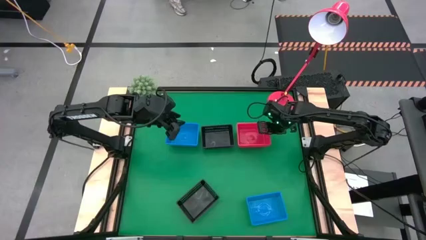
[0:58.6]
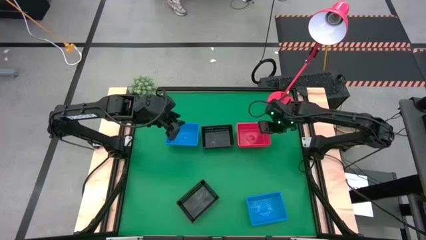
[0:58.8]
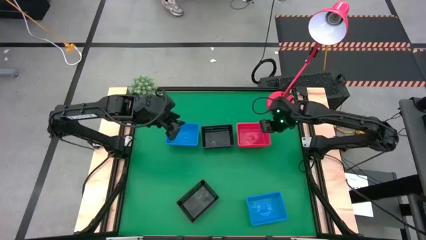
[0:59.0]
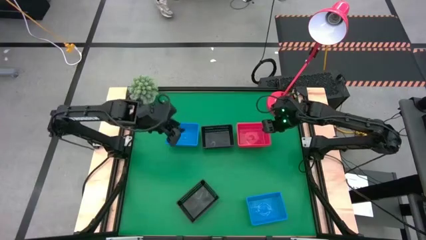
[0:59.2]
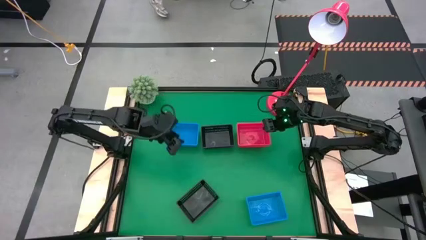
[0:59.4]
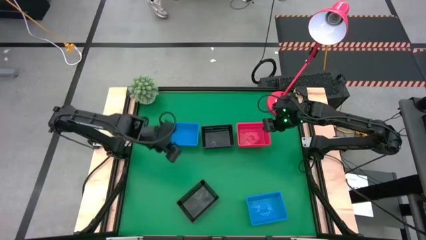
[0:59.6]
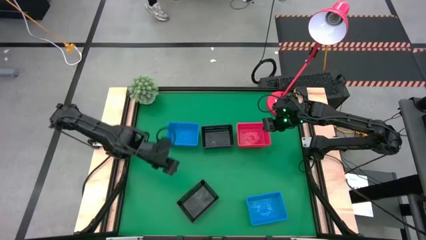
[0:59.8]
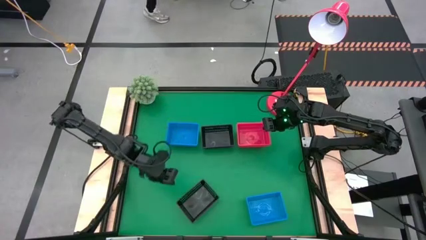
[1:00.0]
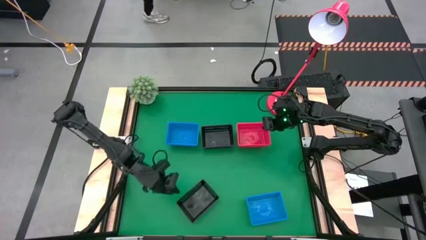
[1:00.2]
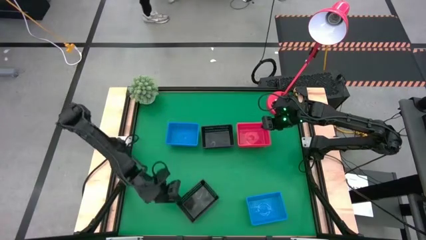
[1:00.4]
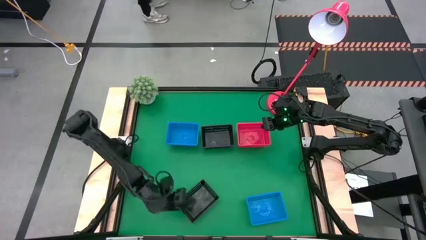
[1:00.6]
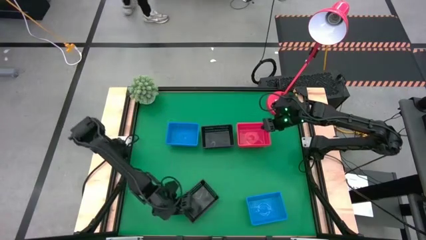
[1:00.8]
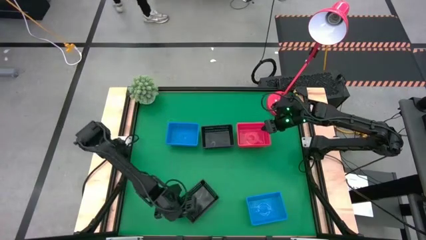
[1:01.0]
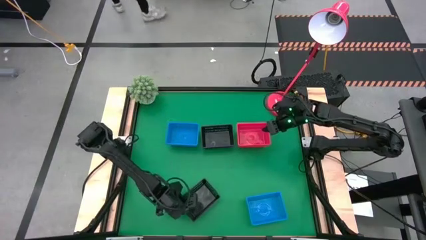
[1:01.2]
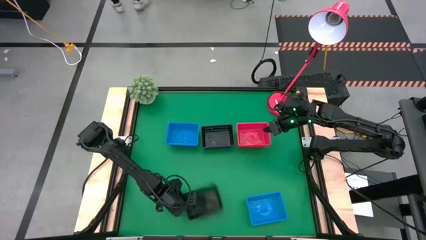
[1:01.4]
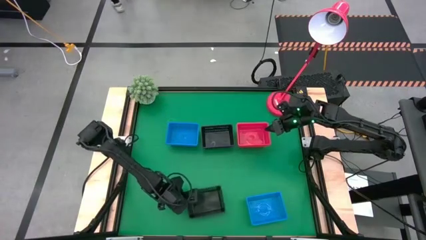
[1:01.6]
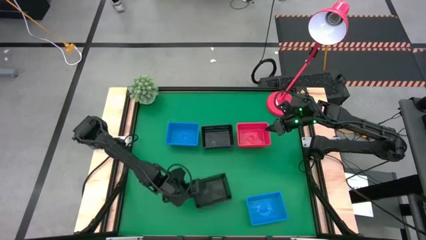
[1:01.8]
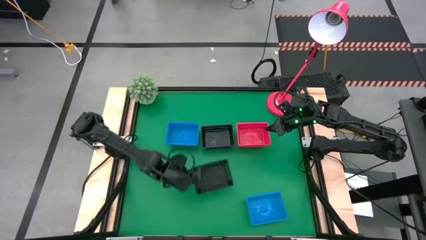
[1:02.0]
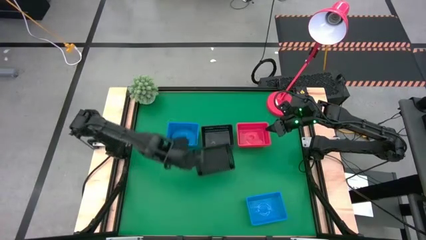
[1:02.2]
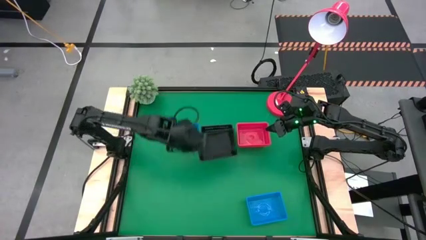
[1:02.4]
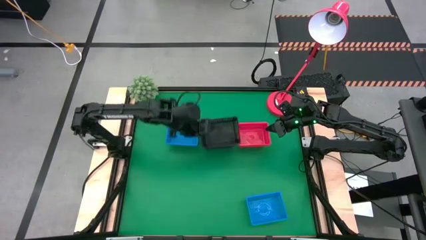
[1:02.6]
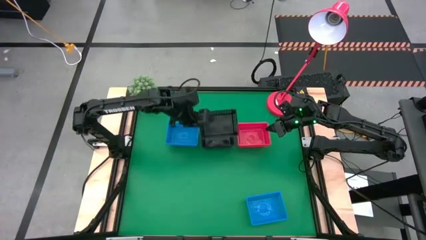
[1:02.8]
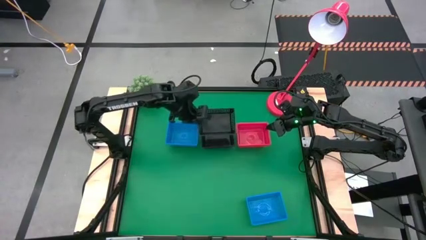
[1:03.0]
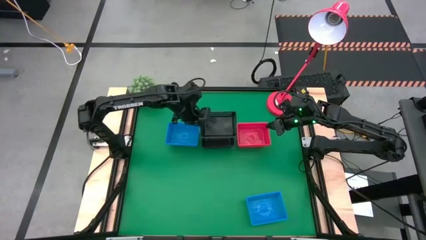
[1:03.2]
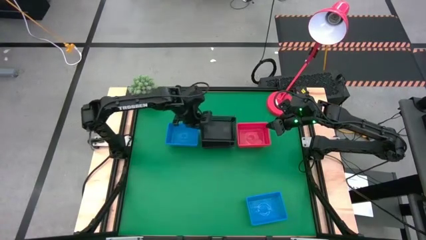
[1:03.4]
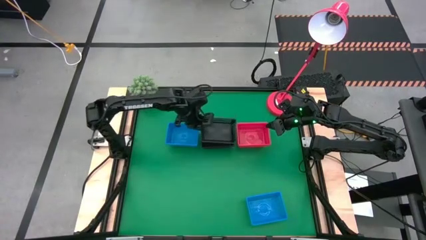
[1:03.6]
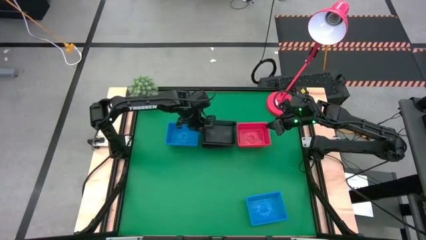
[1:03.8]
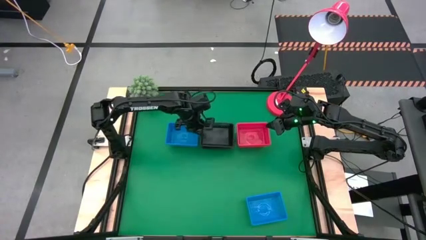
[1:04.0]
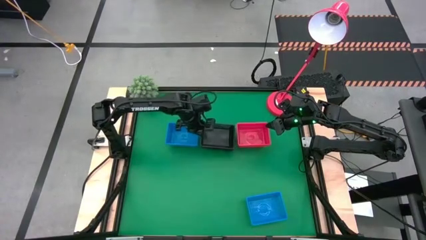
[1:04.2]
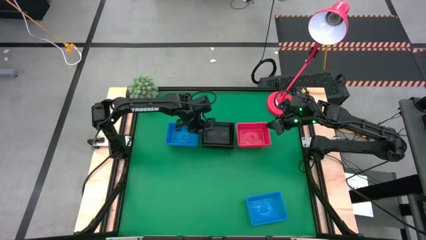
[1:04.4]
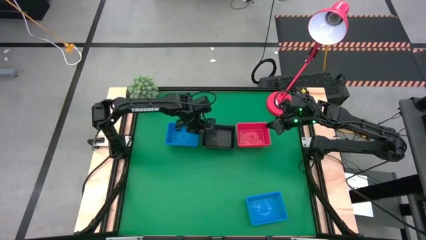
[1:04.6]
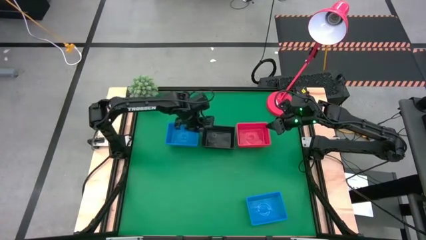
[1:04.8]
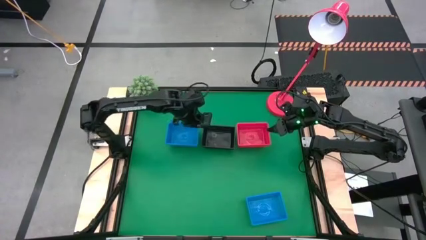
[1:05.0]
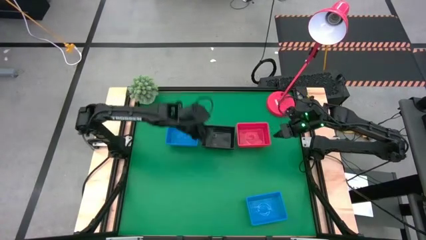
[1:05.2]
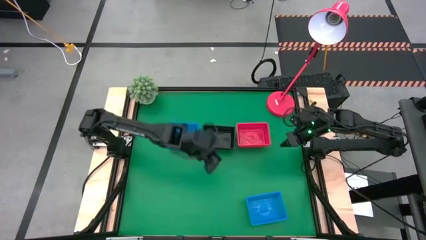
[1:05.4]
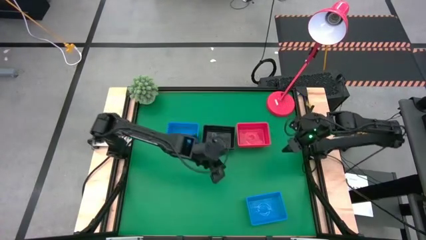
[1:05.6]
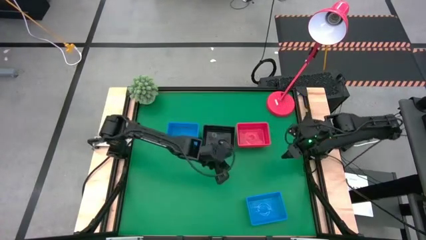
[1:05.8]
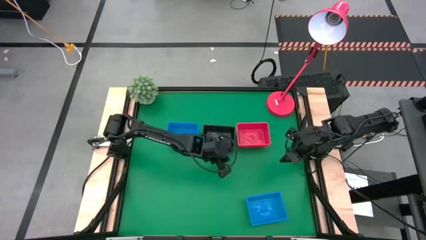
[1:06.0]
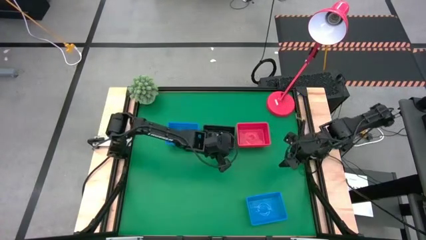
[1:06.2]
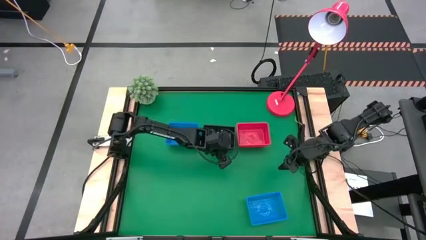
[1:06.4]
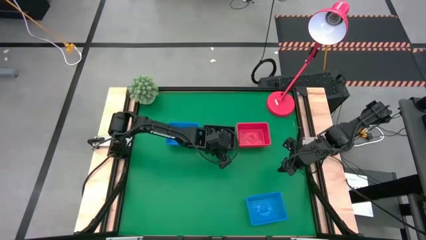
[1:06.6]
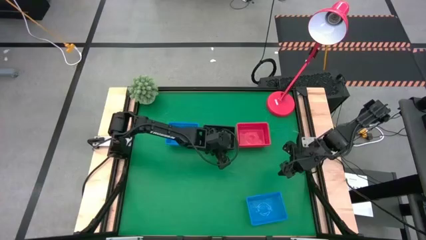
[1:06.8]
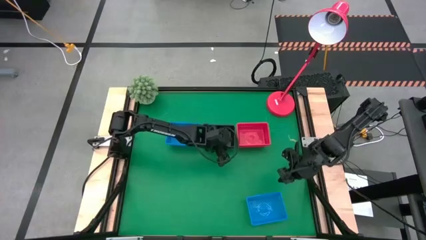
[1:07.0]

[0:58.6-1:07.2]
Stack the bottom black bin on the top stacked black bins

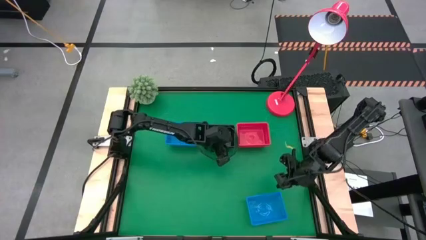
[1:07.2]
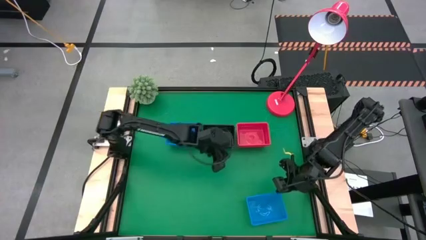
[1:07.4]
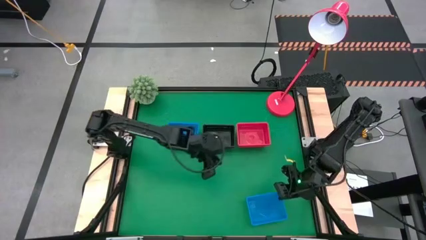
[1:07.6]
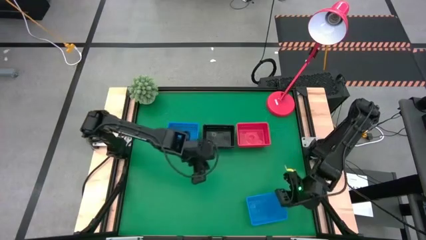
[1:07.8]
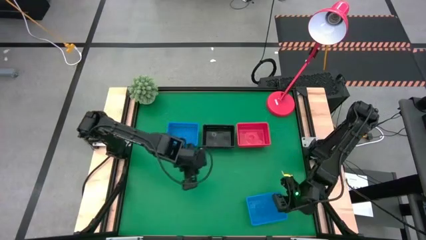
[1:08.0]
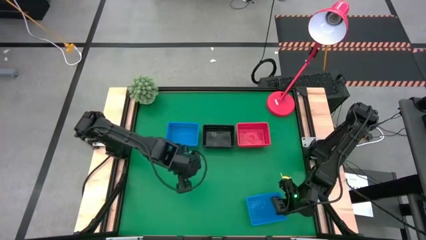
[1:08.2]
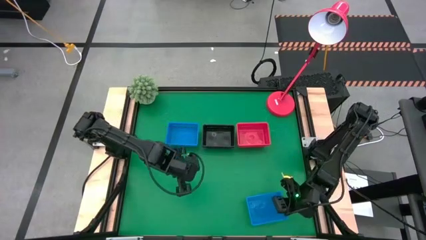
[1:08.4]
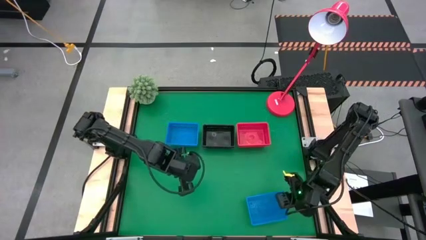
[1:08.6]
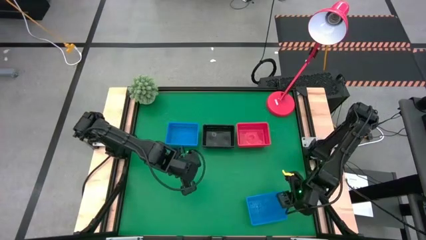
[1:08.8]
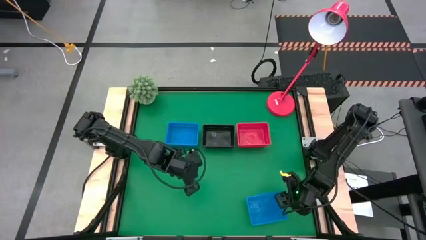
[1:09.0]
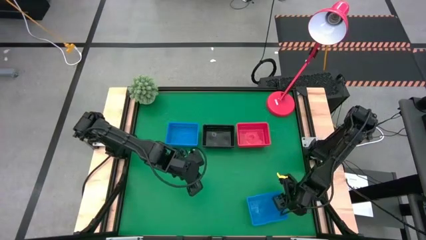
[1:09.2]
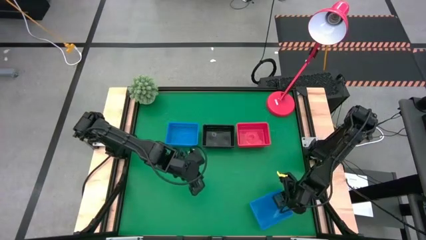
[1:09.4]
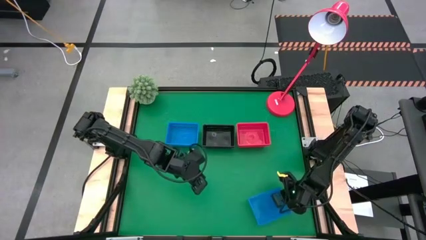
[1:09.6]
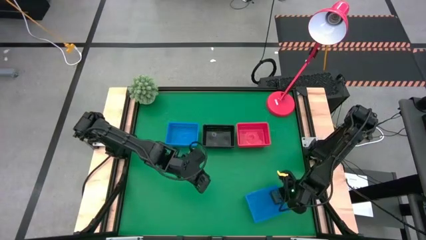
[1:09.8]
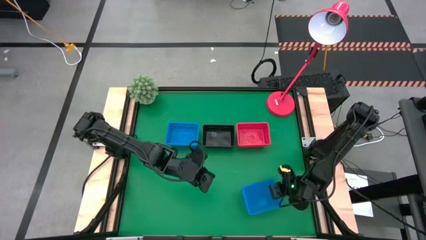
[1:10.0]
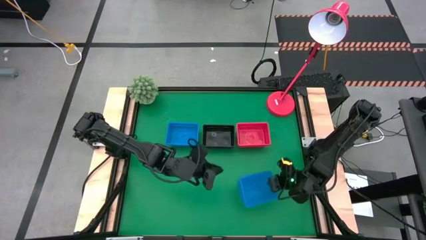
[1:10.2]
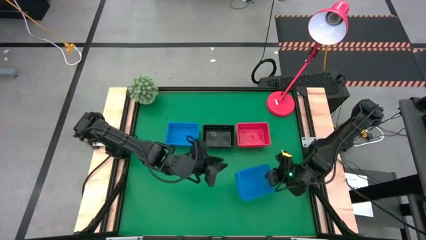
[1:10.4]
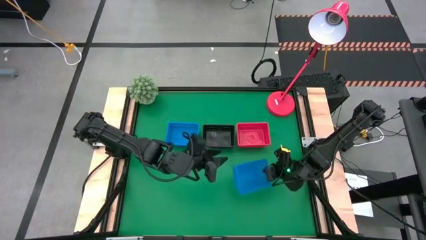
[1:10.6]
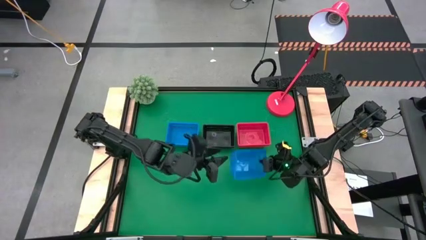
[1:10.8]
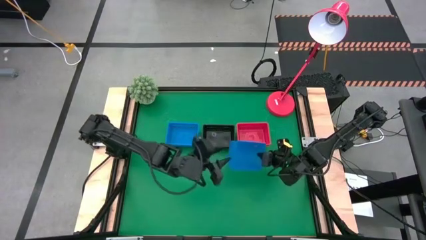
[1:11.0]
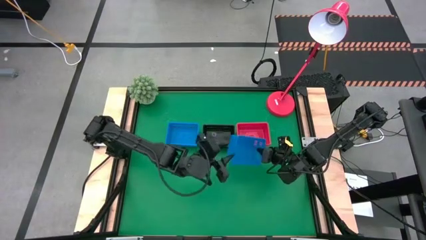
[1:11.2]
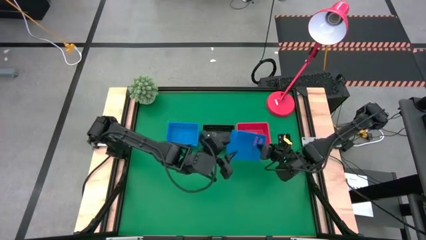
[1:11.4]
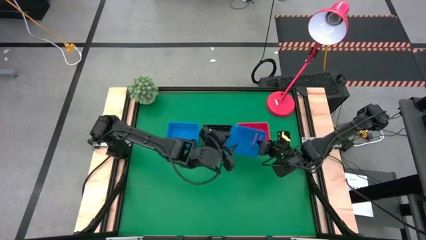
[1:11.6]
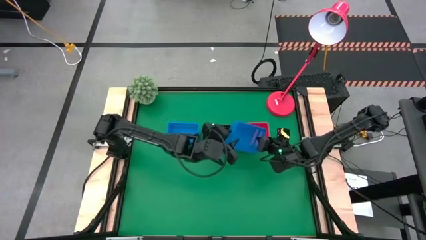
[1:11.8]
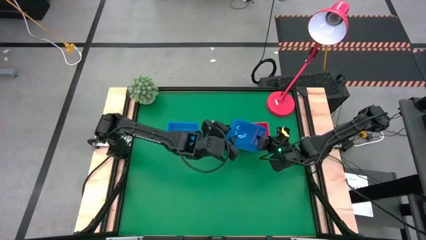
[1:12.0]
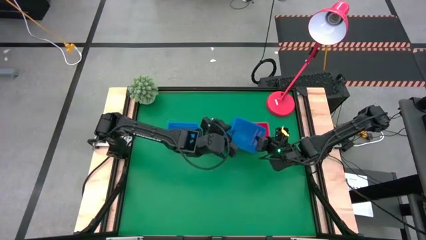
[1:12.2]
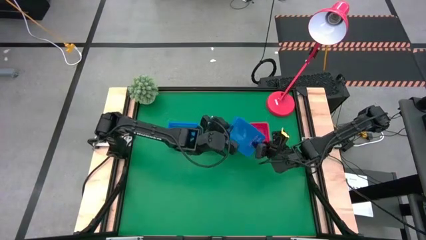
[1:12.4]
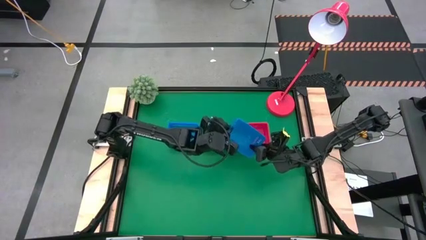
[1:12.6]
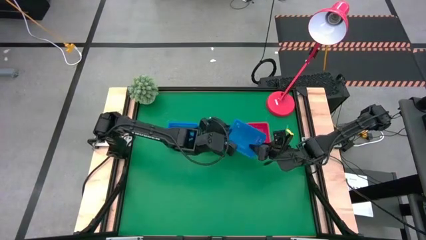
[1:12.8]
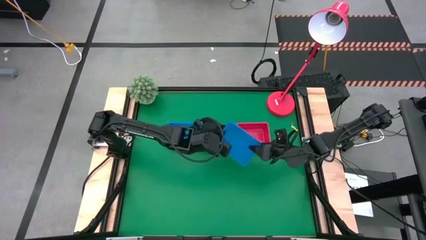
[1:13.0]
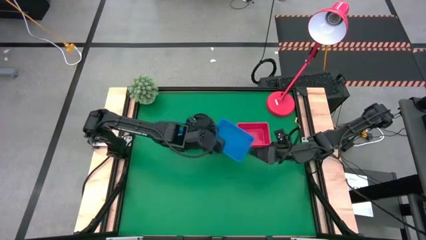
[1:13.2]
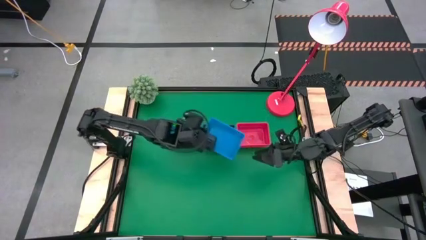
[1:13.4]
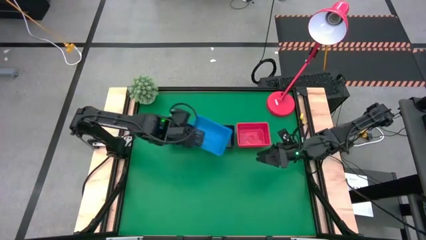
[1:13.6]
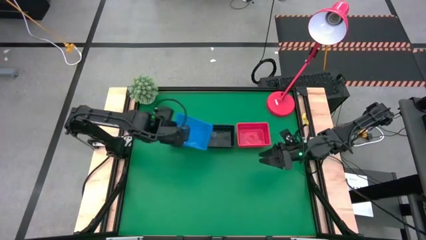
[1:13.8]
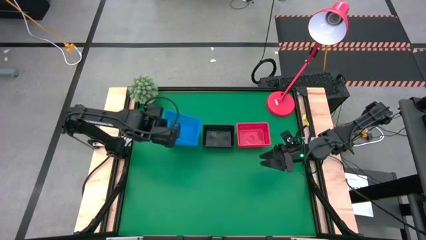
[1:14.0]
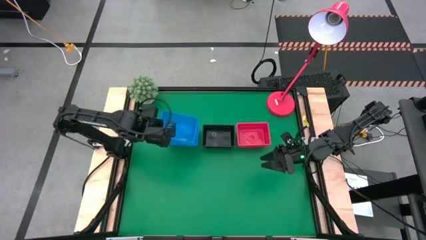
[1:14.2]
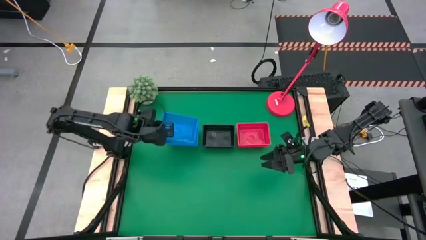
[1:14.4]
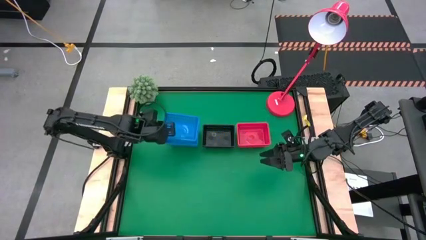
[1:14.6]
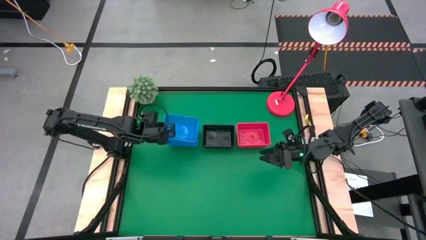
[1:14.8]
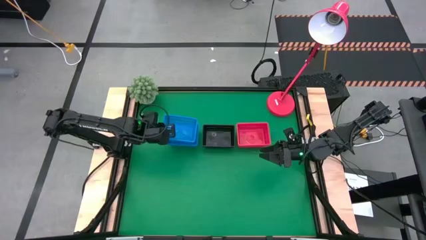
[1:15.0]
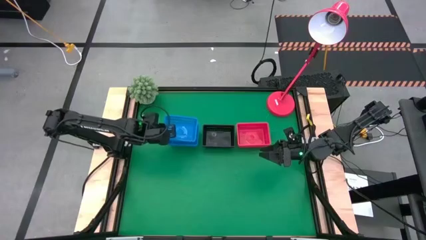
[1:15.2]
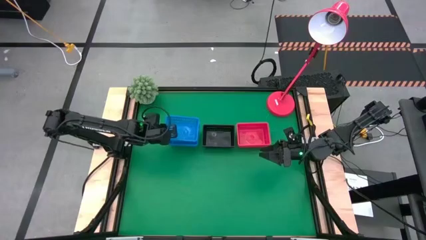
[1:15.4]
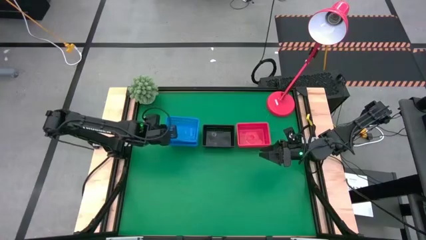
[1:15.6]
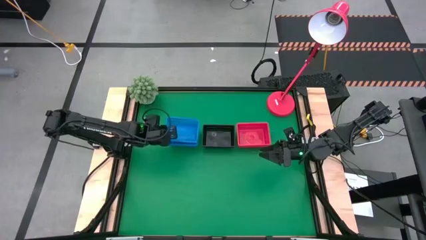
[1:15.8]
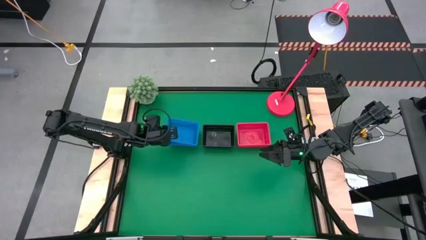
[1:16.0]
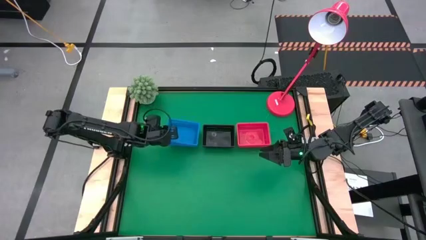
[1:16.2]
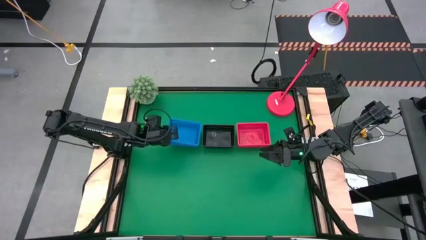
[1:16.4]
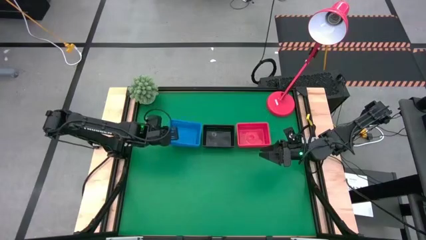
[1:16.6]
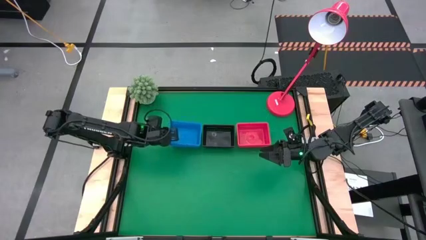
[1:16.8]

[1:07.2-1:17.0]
Stack the bottom blue bin on the top stacked blue bins
